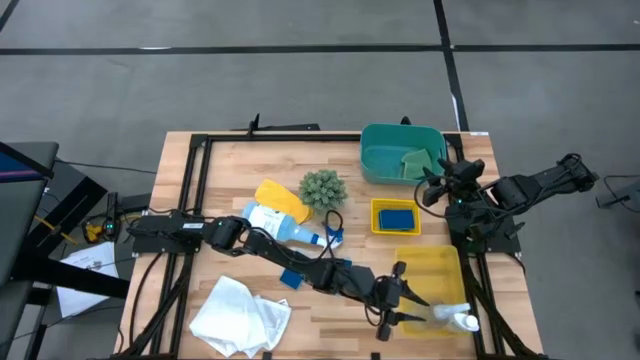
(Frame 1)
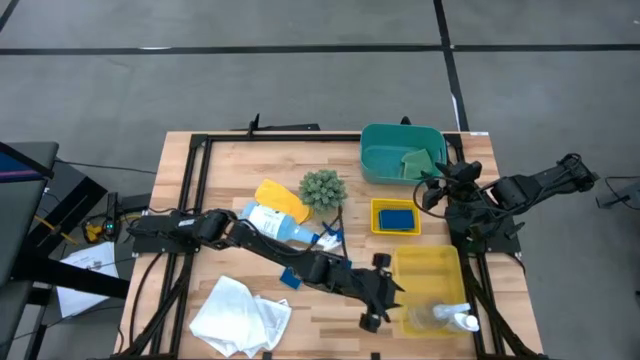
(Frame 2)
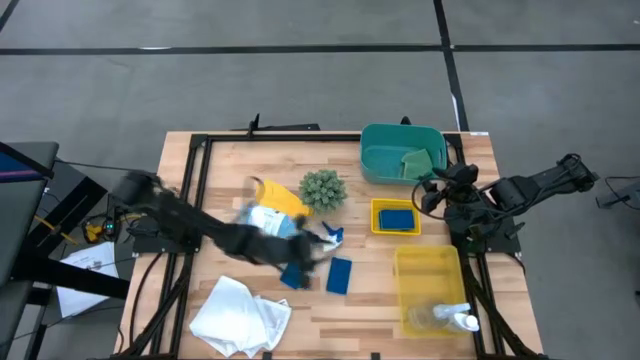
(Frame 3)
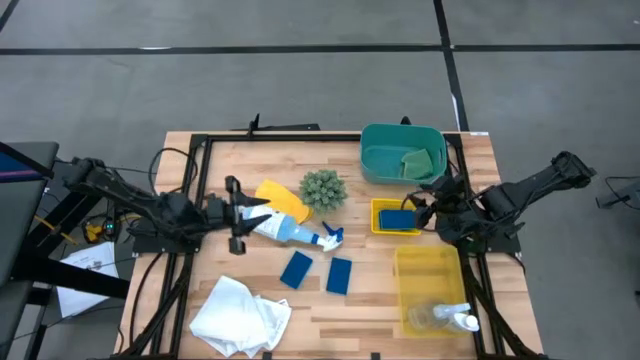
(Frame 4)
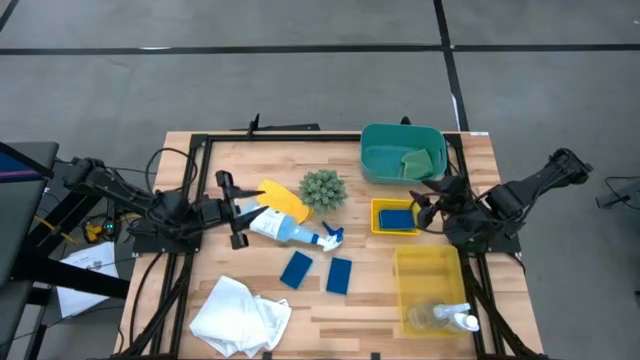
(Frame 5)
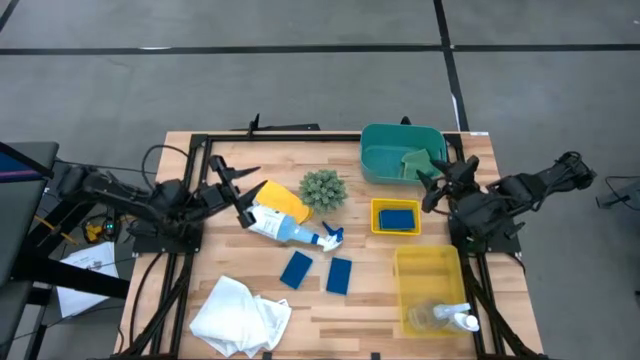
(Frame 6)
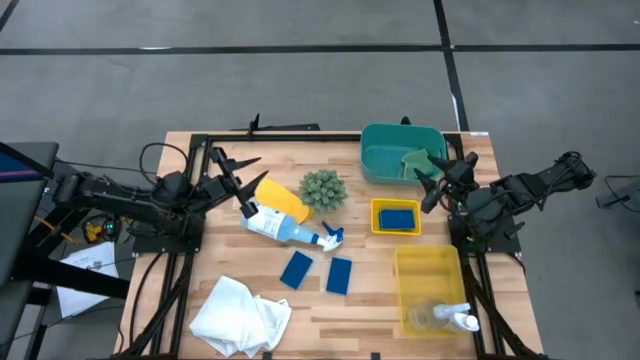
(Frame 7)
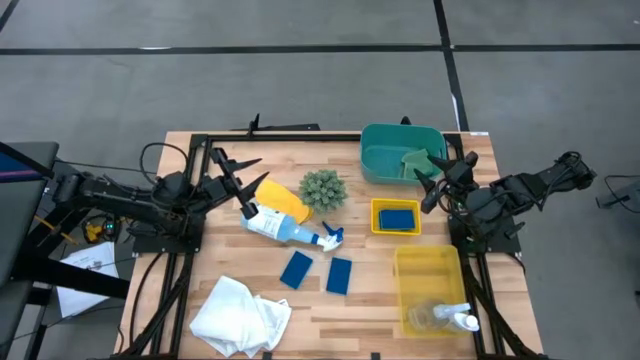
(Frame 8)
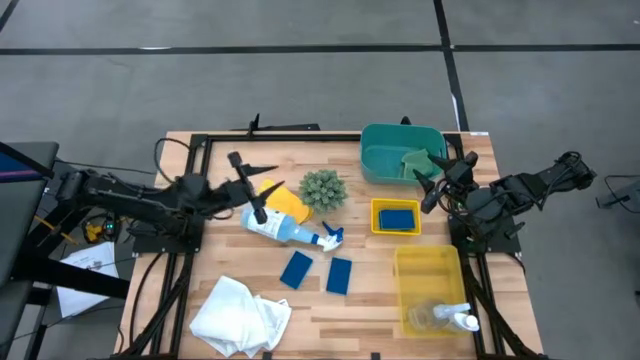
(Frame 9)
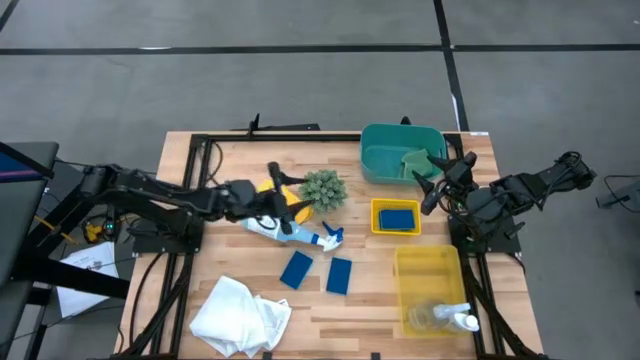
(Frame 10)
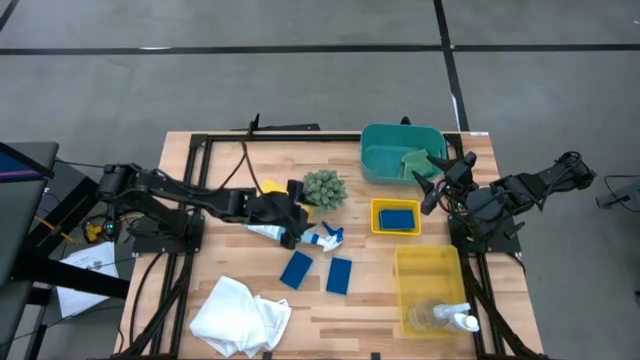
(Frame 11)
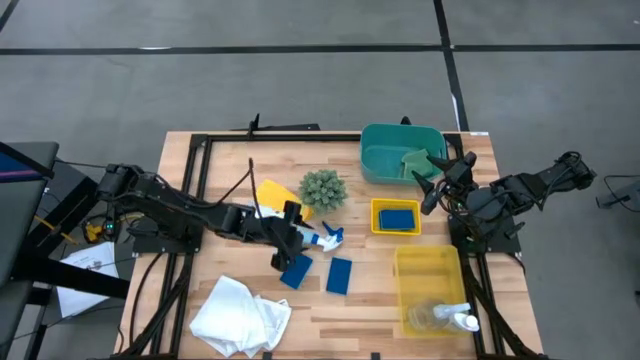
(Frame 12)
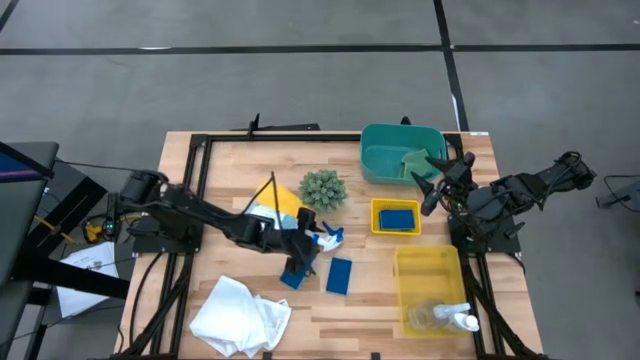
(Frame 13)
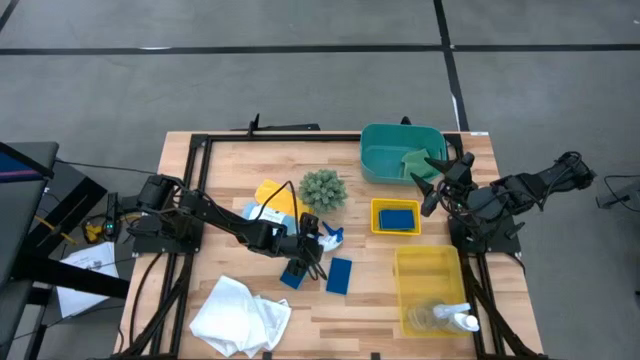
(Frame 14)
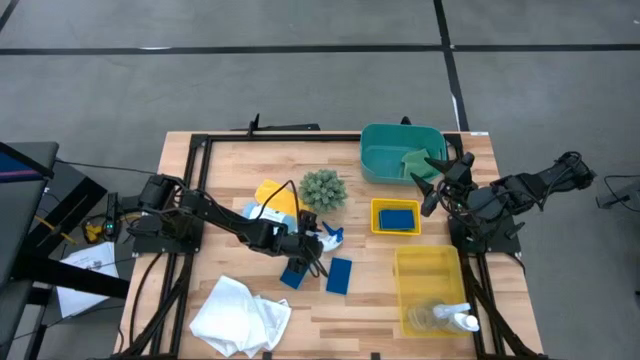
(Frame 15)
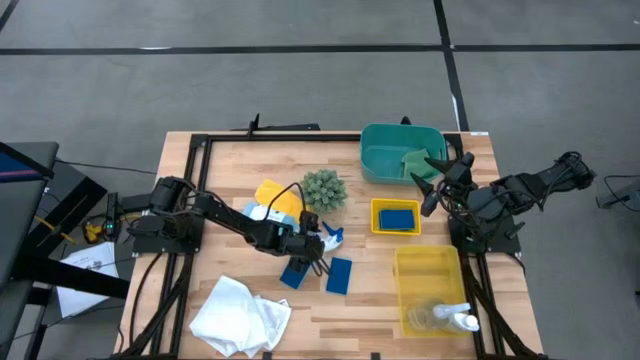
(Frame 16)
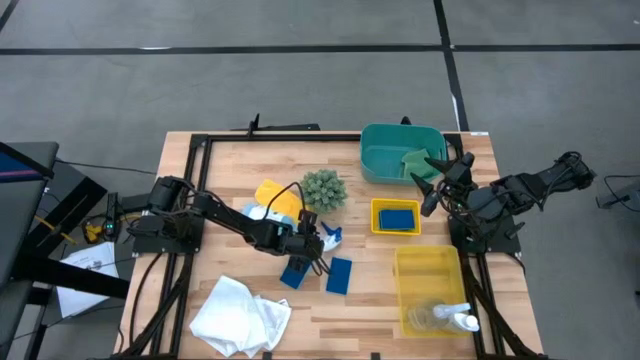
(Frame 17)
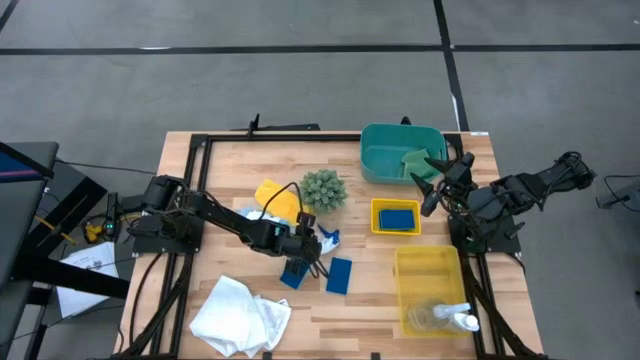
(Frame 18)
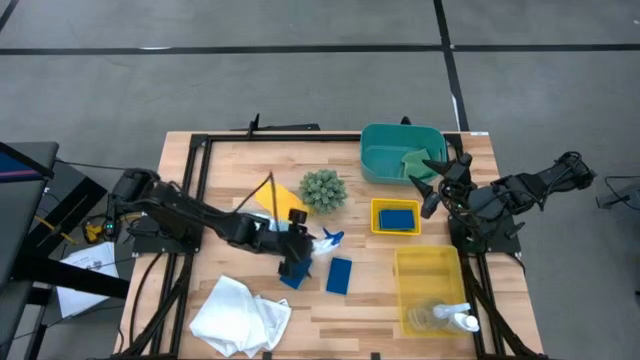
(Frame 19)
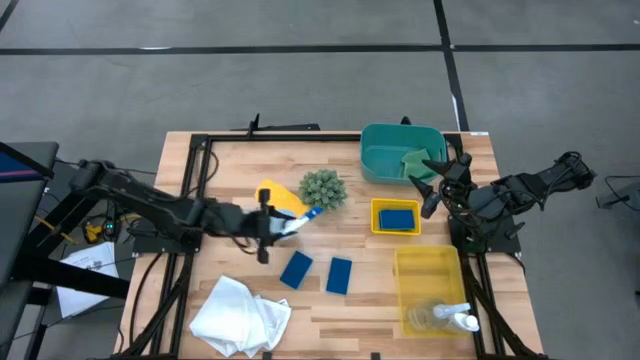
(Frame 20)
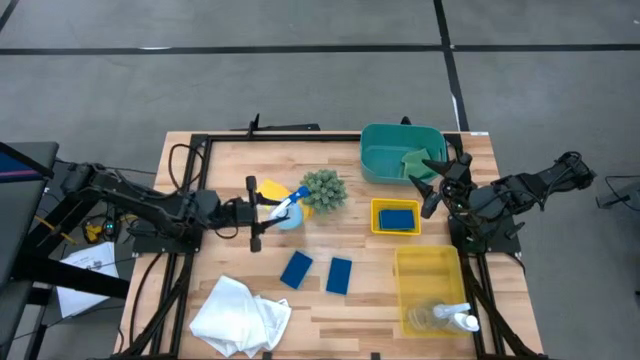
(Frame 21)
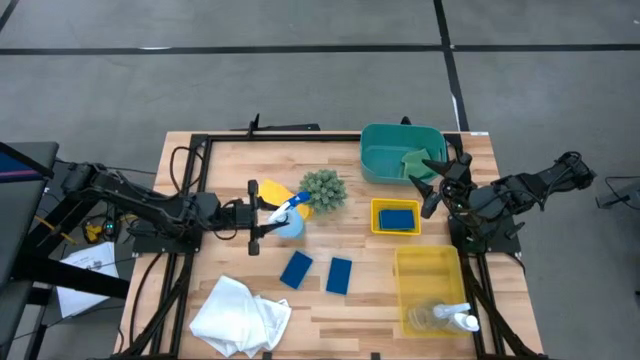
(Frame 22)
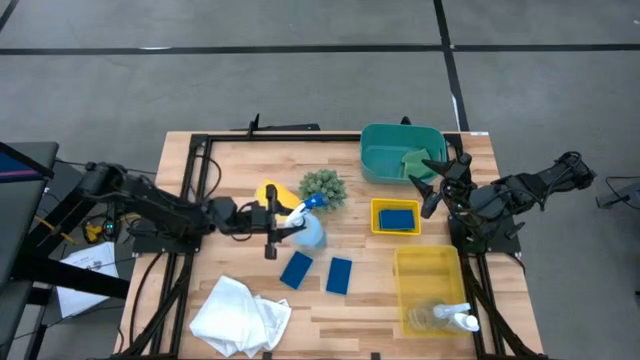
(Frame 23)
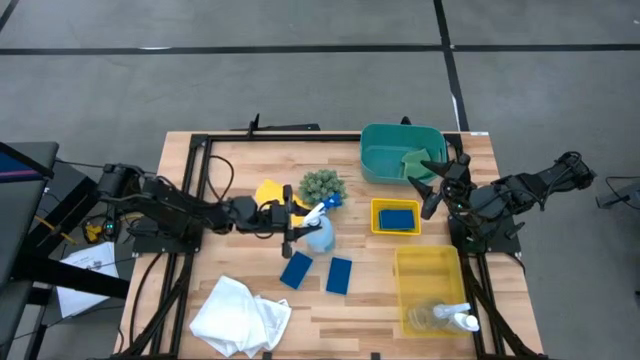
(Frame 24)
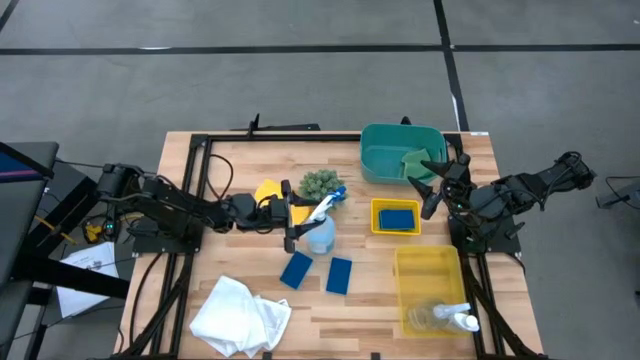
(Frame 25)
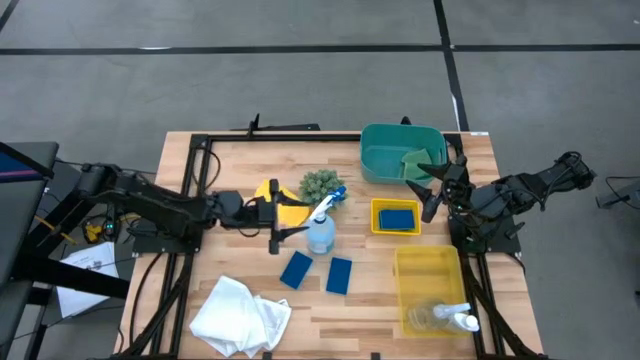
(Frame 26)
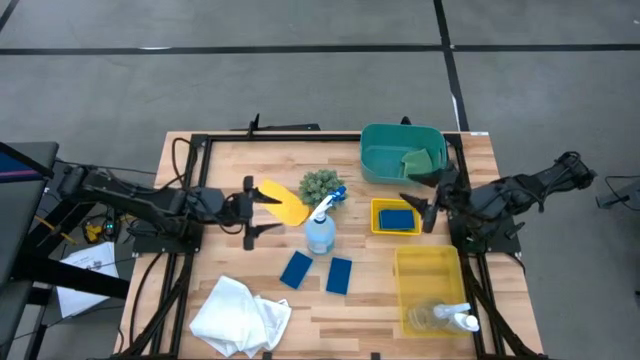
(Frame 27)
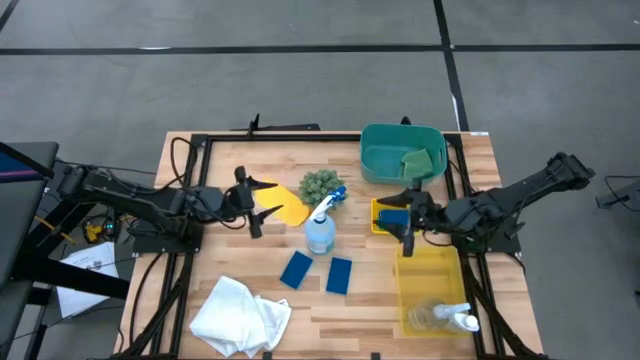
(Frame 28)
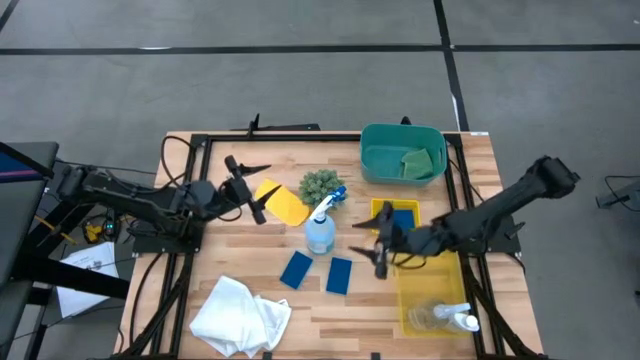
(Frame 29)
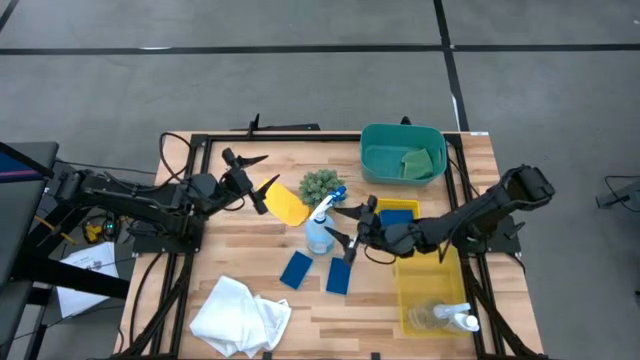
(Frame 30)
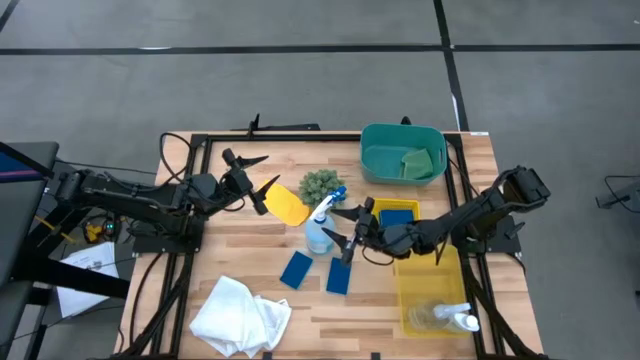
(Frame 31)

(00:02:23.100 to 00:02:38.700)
Task: Pick & Place Kitchen Items
Put the white bottle into the bottom yellow bin

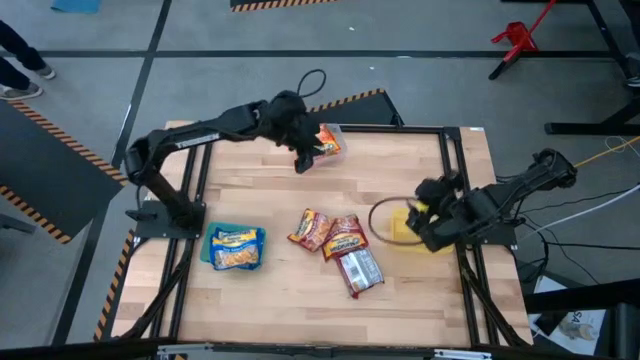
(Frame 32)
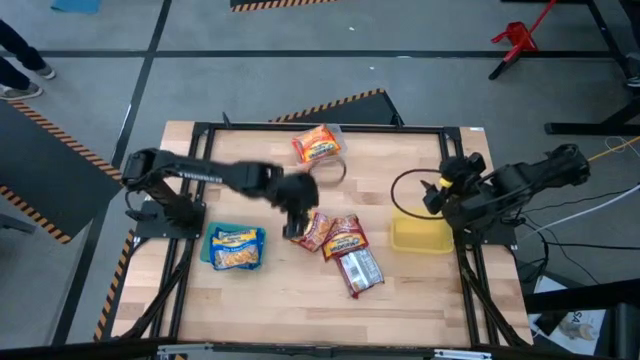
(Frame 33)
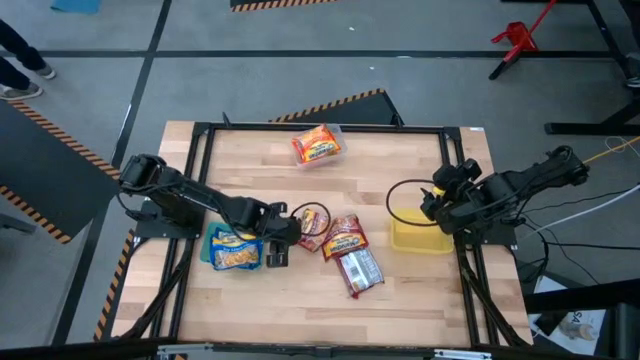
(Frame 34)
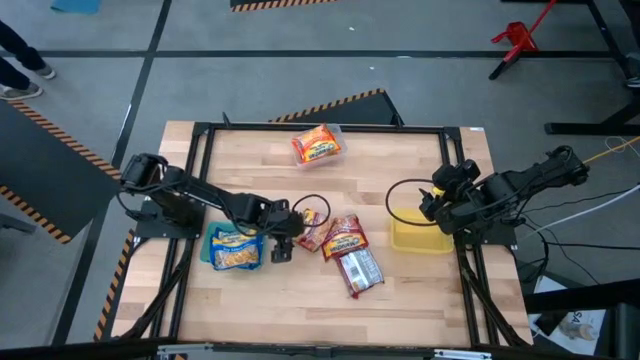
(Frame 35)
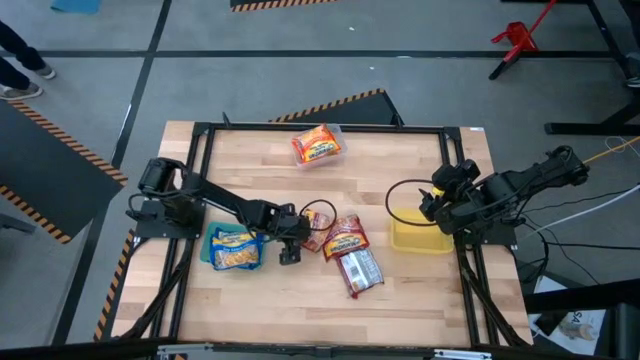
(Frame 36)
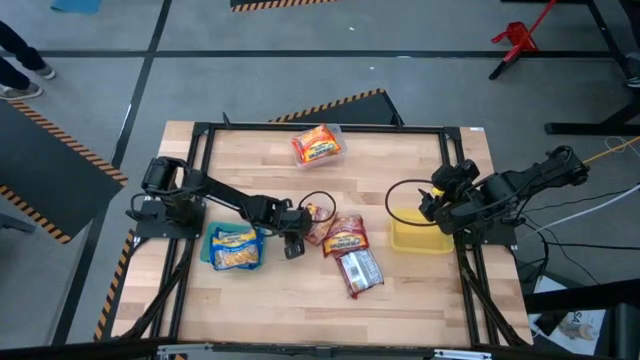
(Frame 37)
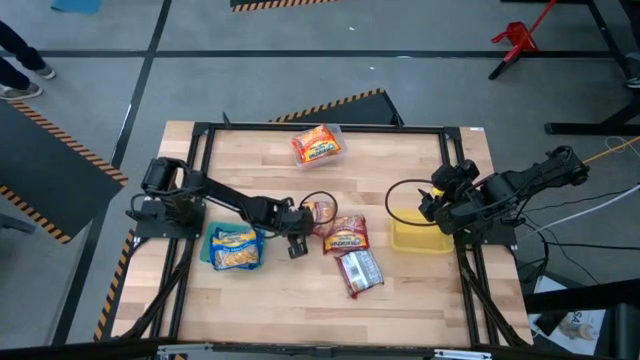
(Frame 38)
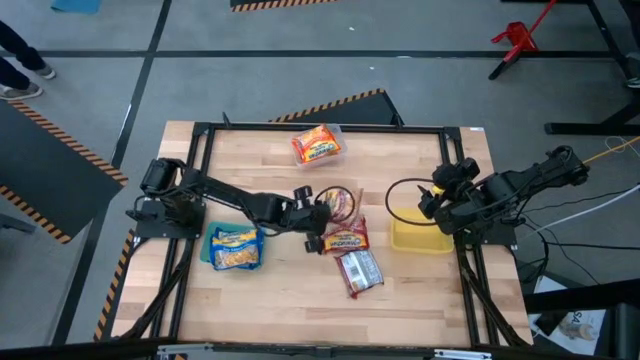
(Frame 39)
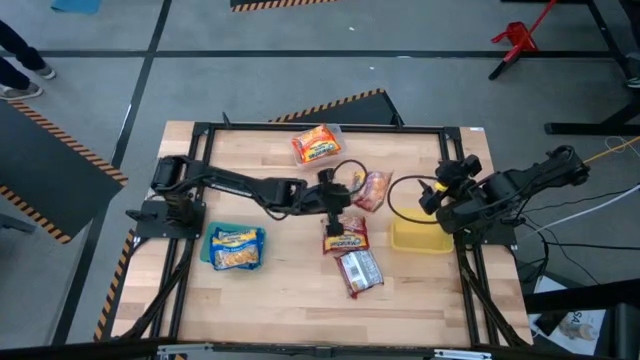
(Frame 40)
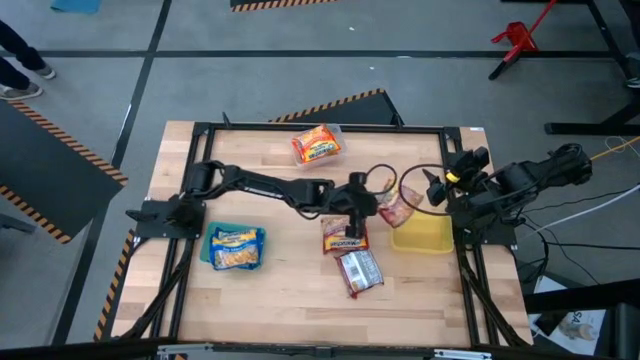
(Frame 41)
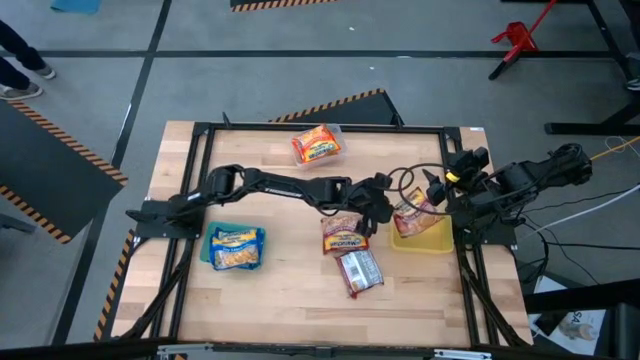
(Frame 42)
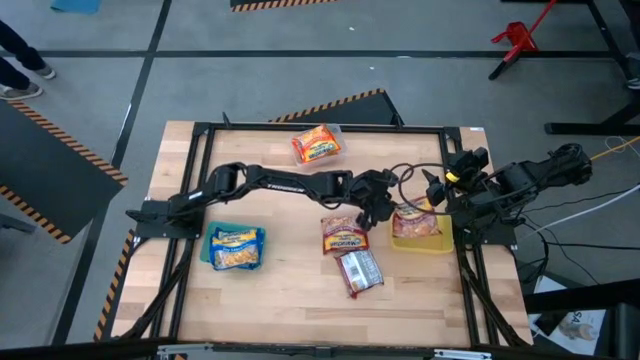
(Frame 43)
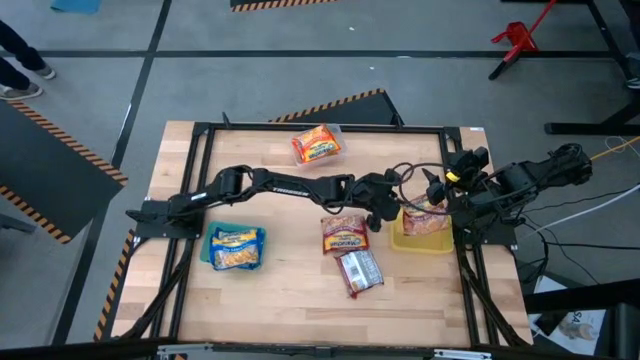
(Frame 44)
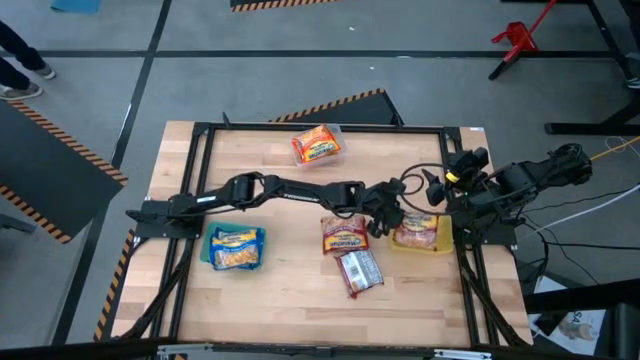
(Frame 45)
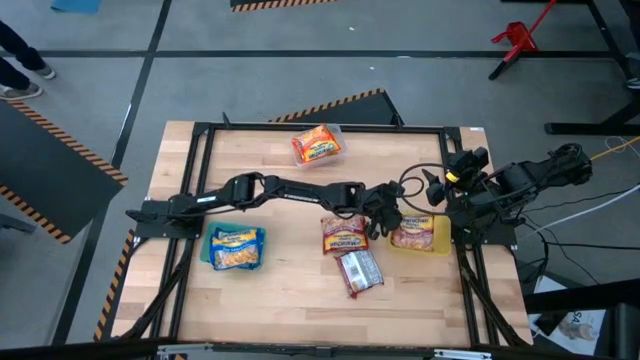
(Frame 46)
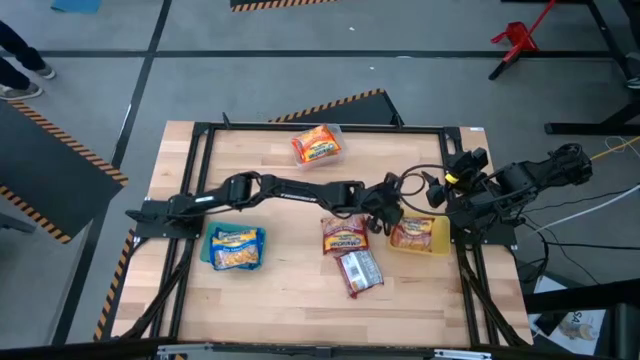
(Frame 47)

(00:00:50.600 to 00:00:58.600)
Task: Sort Maruchan noodles
Put the top left red noodle pack into the yellow bin
